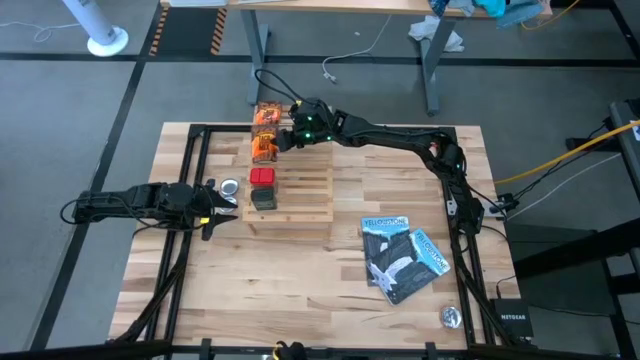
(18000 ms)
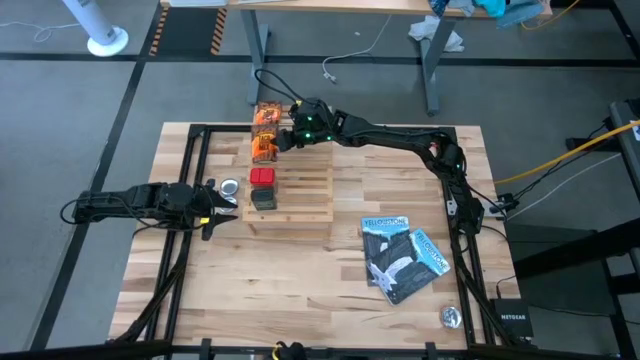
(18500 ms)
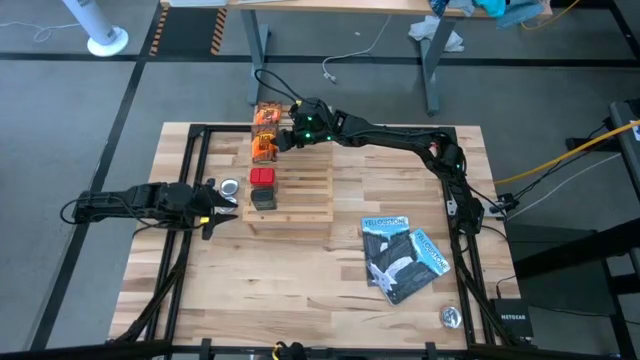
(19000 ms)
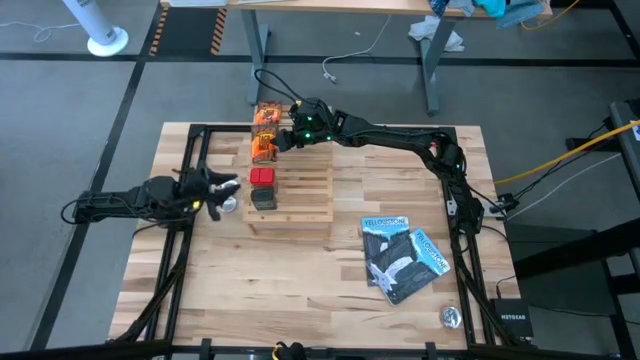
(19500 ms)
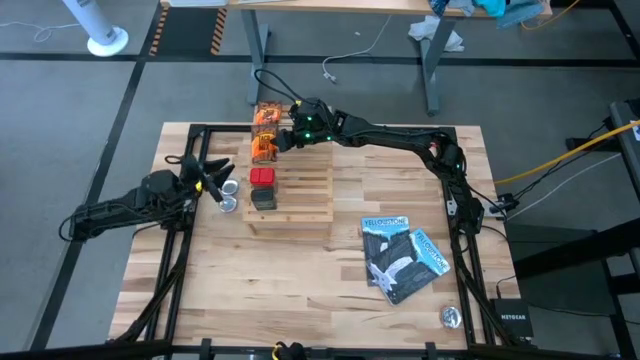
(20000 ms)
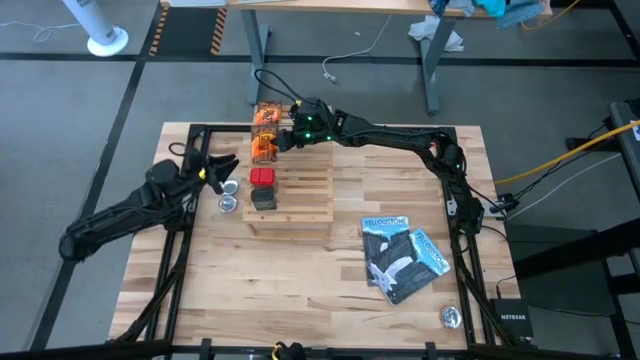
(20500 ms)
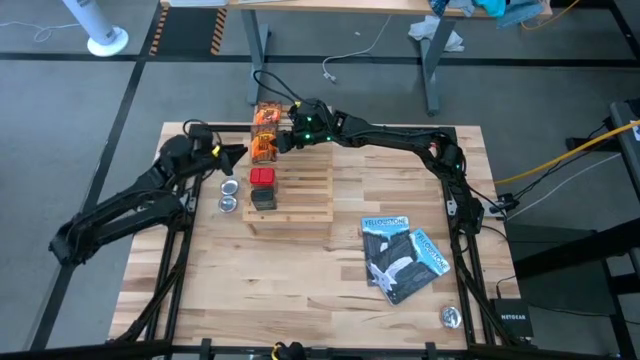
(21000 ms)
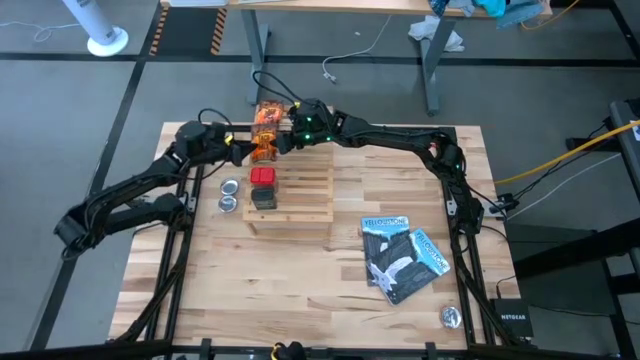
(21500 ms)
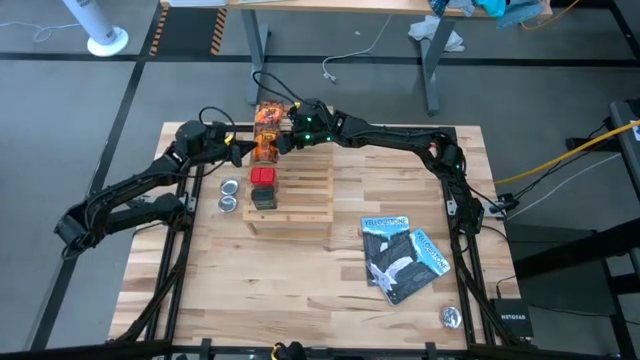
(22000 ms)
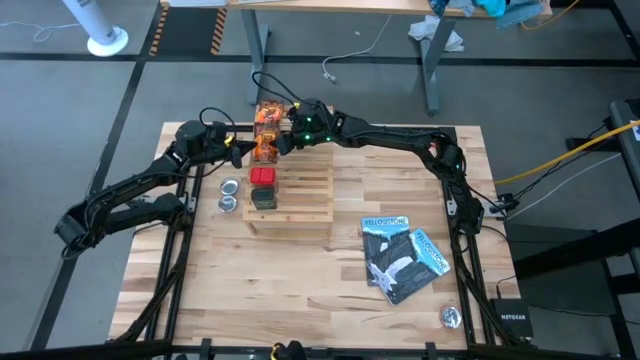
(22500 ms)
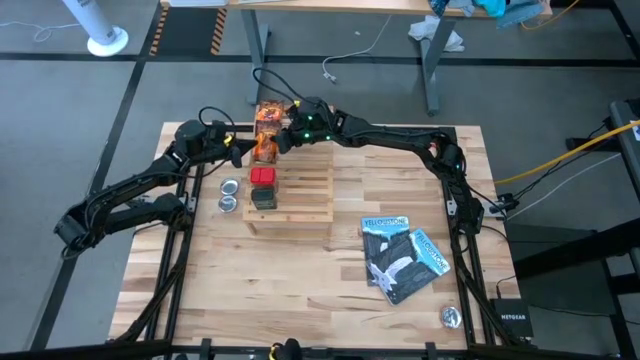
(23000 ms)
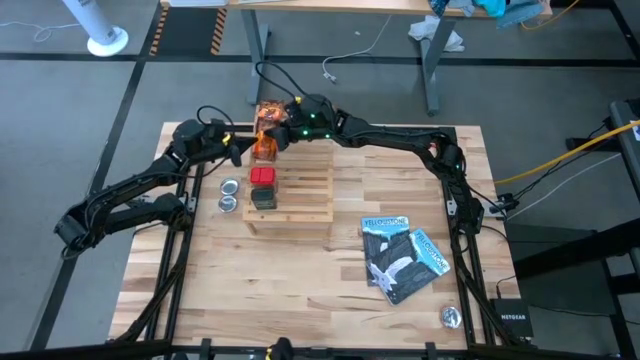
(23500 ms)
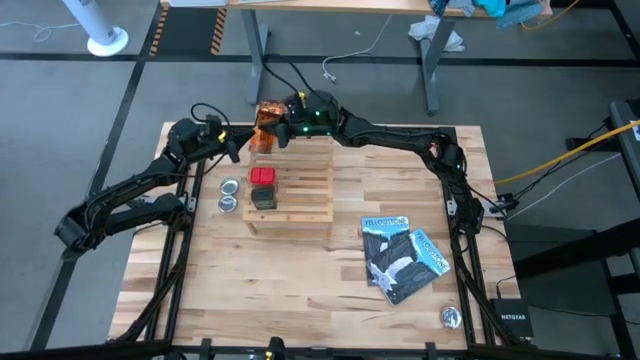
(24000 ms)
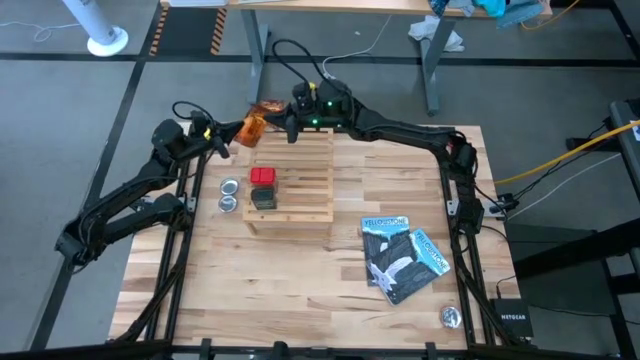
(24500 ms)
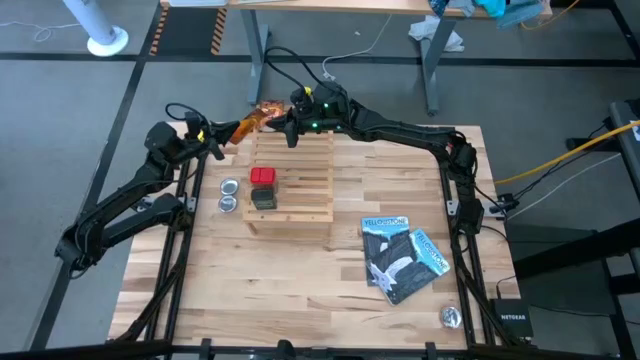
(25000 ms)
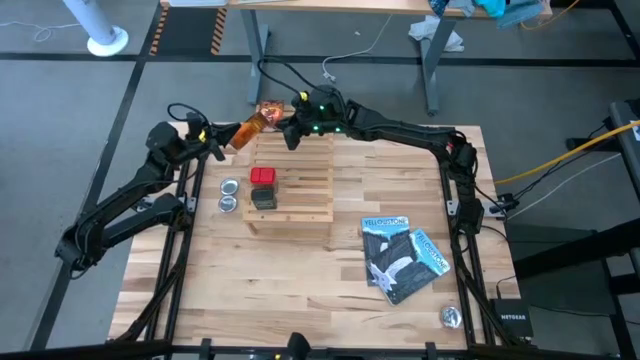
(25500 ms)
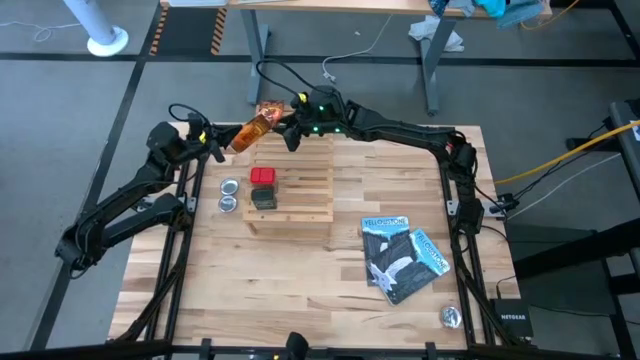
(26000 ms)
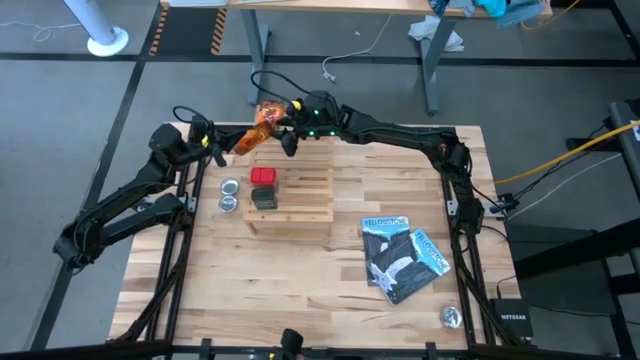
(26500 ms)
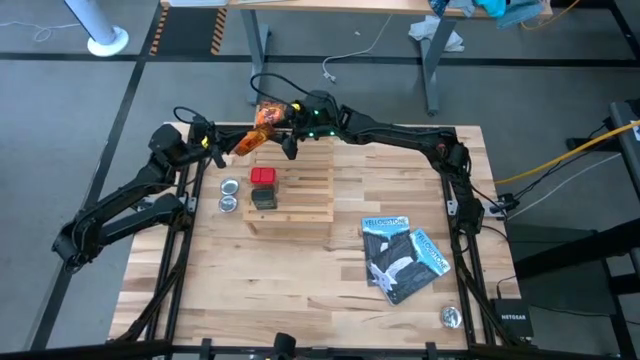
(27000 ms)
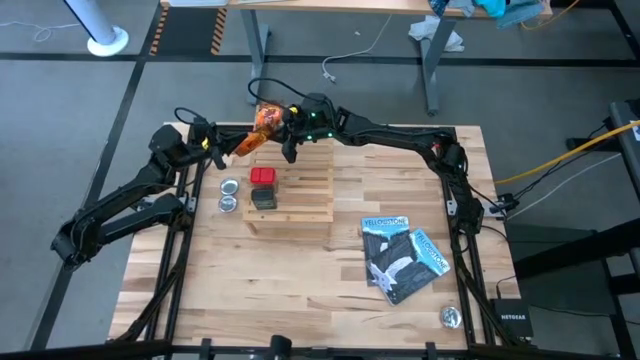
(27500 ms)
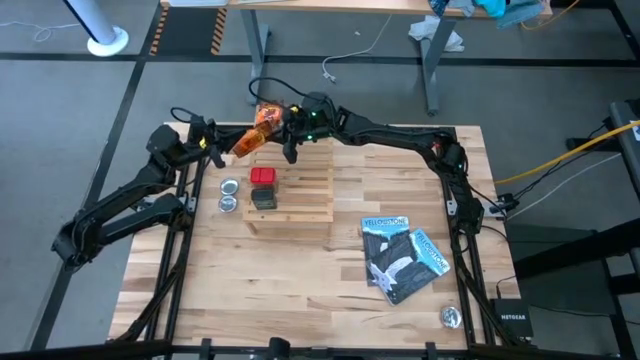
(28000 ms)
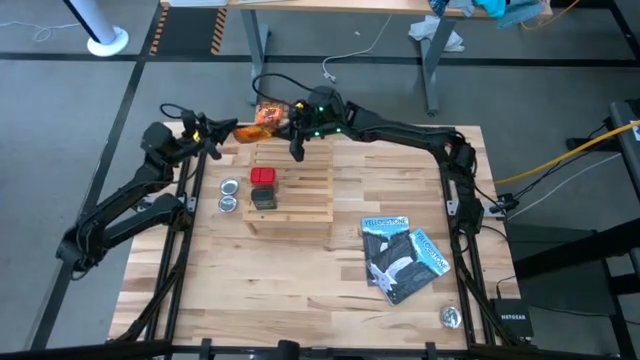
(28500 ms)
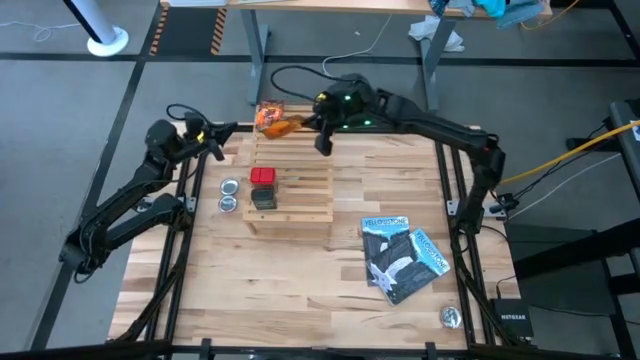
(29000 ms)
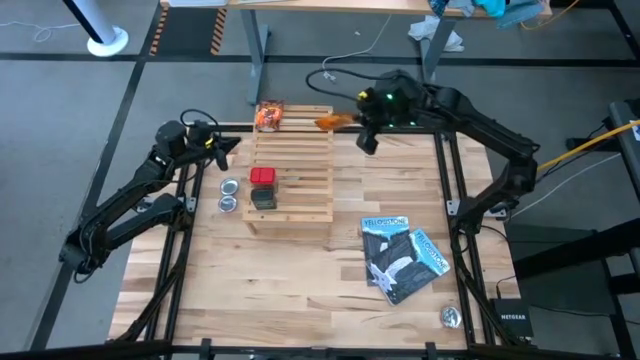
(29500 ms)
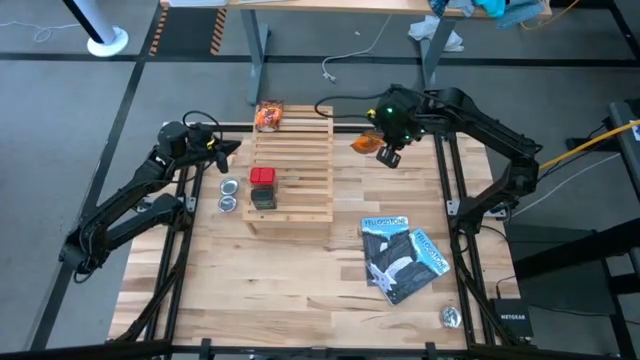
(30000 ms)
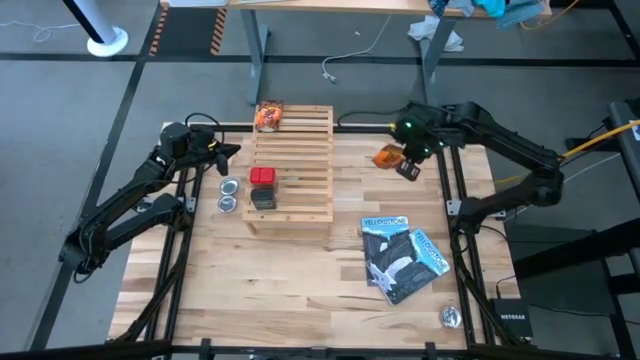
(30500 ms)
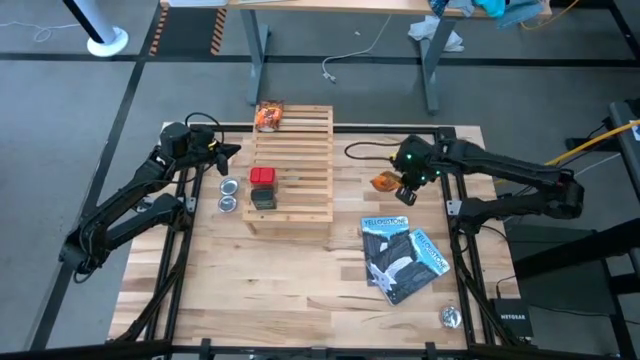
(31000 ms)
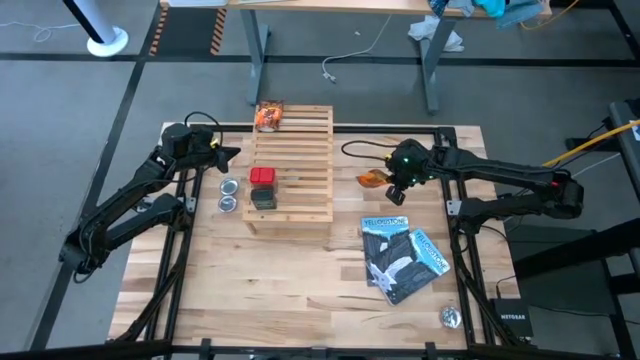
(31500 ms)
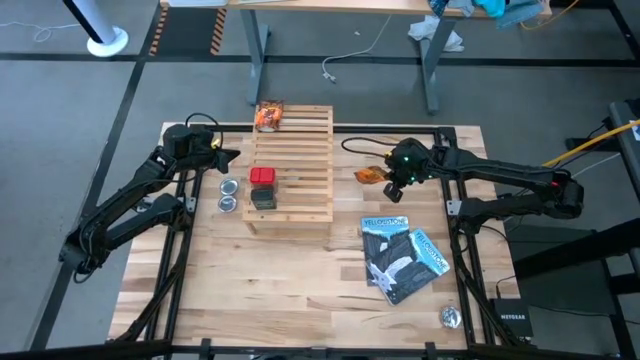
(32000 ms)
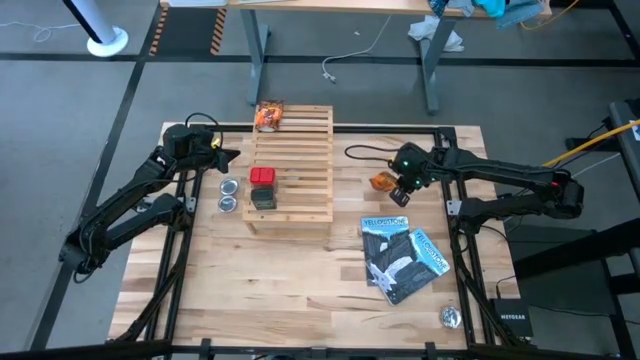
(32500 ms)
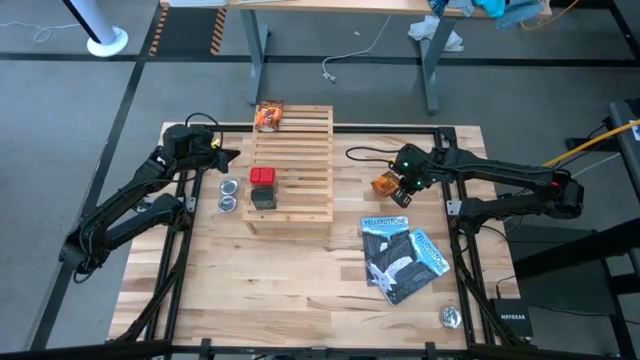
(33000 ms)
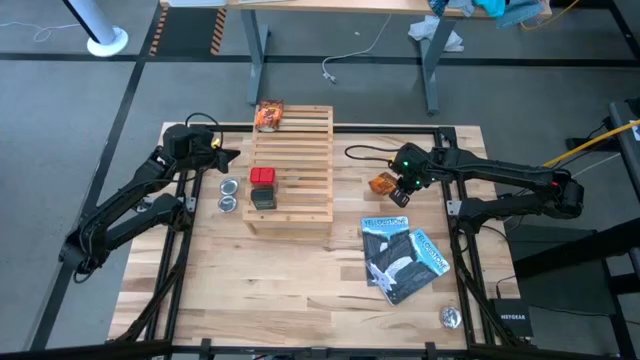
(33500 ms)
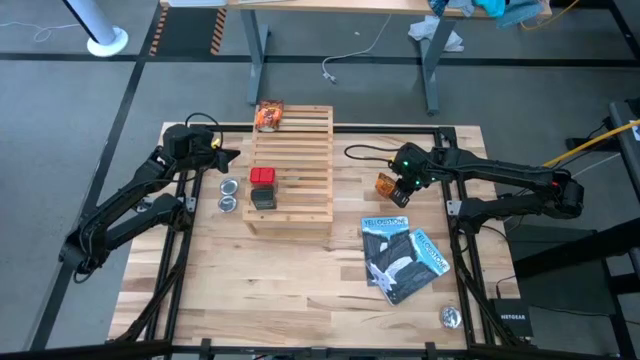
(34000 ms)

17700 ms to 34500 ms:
Task: Shelf spices
Remove the orange seasoning pack from the shelf

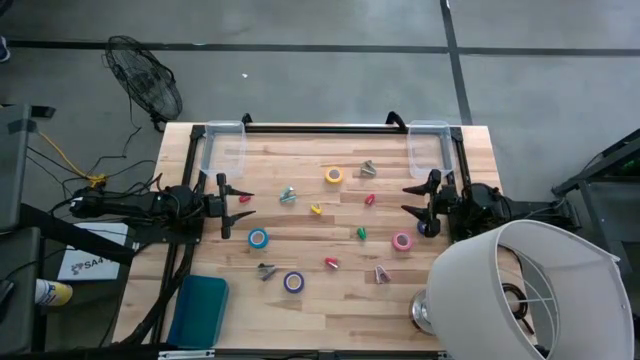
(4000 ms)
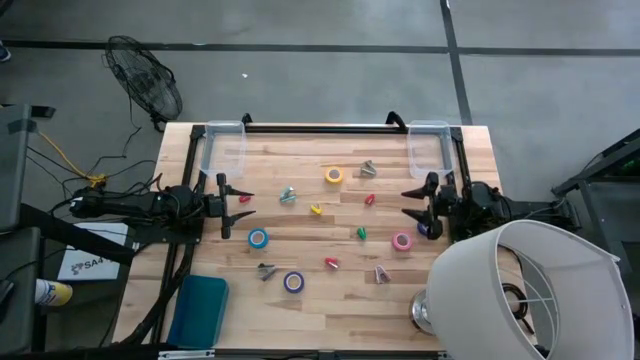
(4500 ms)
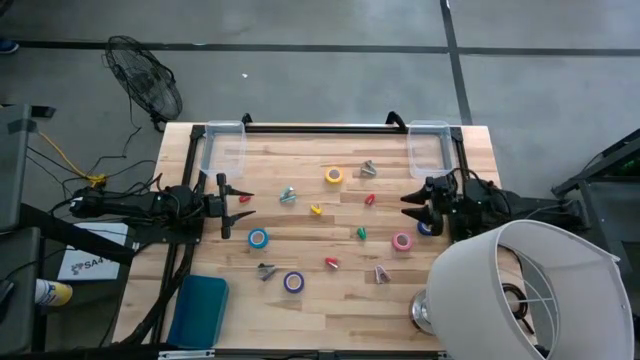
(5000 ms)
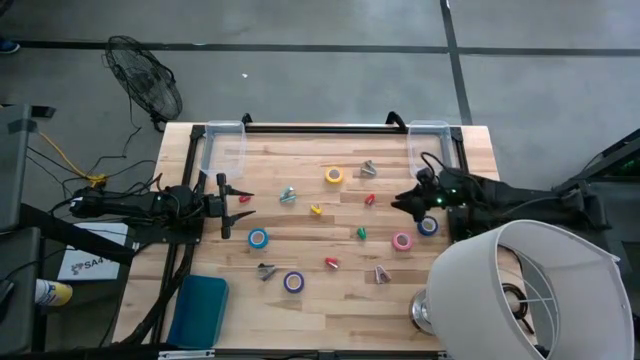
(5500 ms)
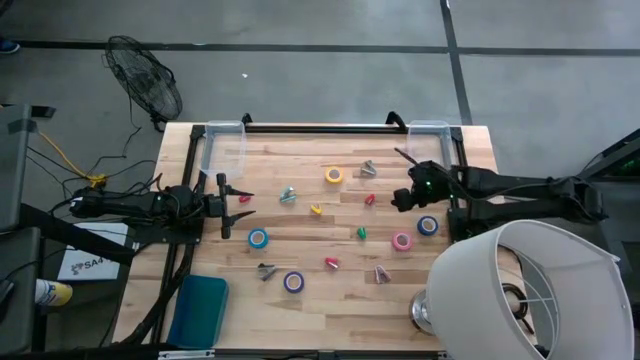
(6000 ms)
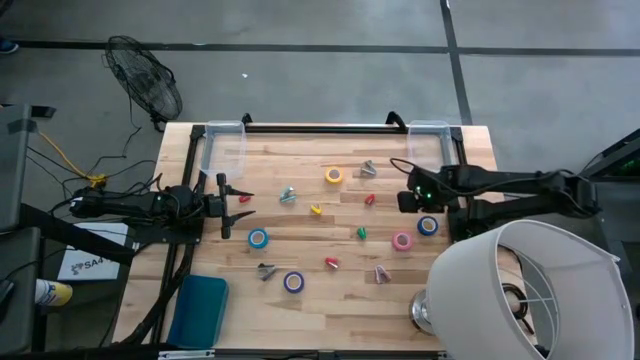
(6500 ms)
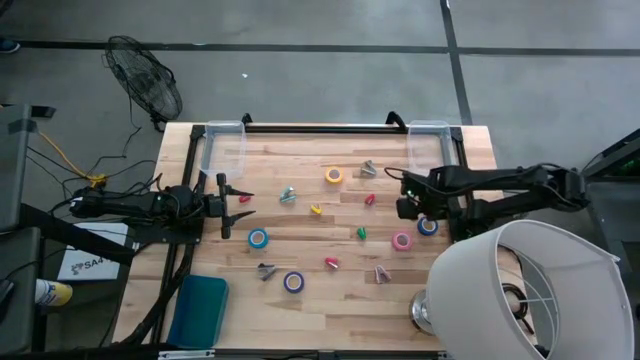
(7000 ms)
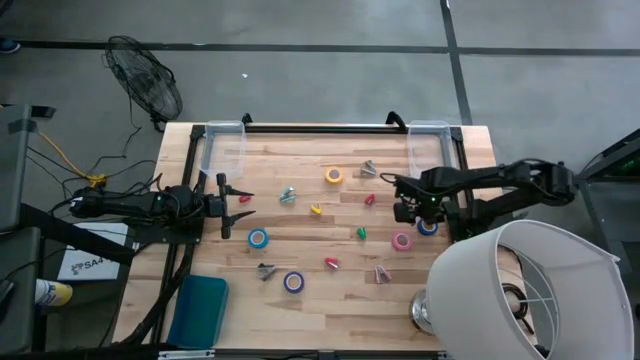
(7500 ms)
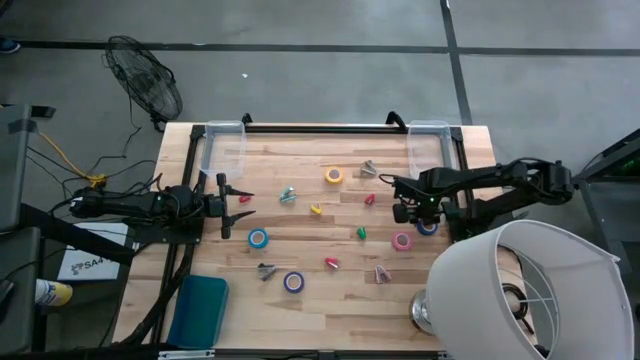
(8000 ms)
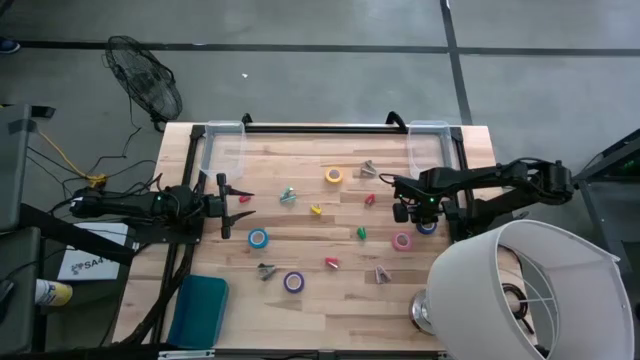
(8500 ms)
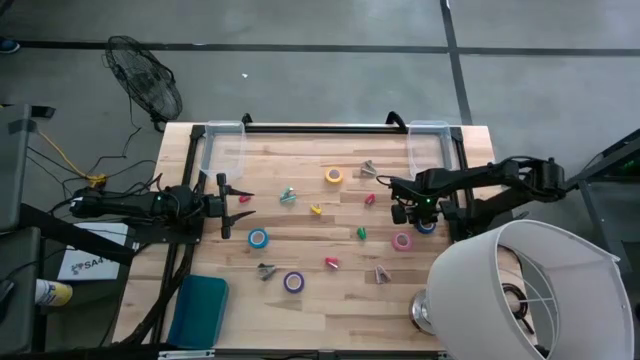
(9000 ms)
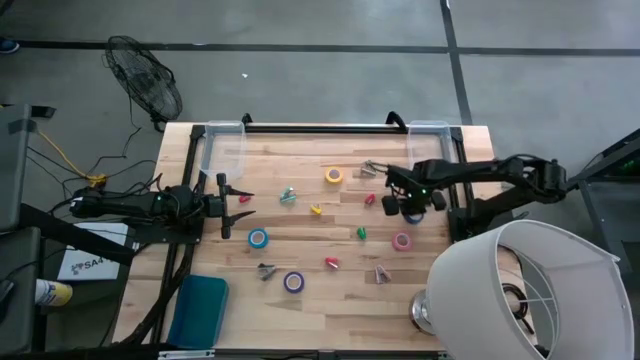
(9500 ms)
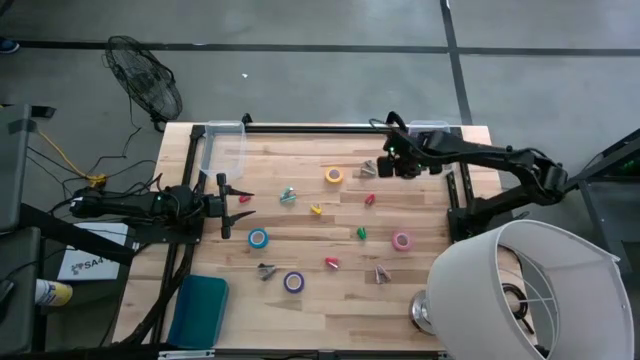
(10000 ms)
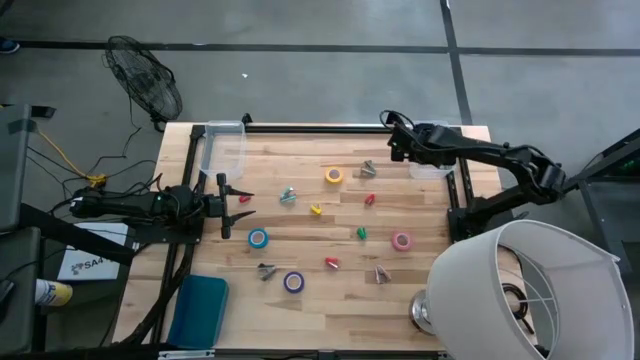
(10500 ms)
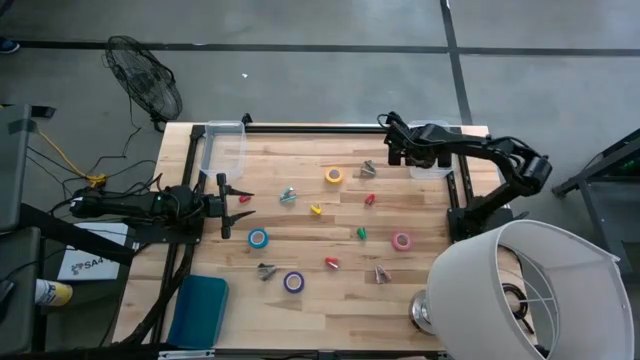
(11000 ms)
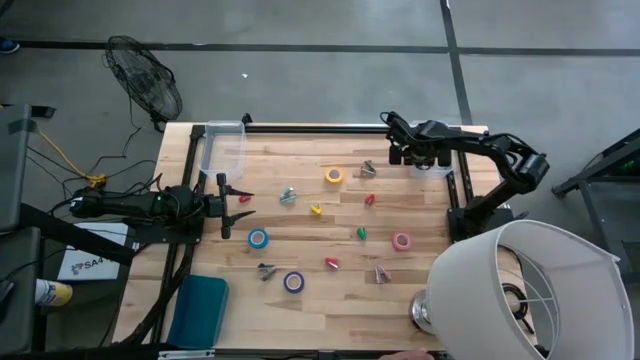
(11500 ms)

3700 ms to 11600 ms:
Task: Pick and place Stapler, Stapler remover, tape
Put the top purple tape into the right transparent bin
